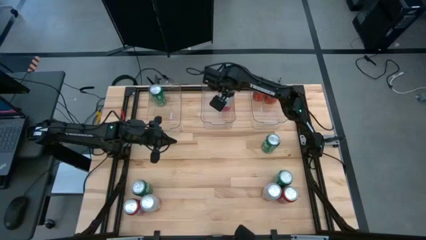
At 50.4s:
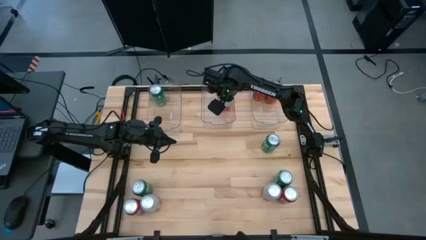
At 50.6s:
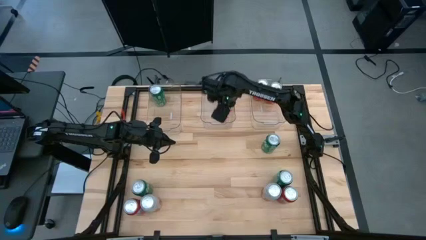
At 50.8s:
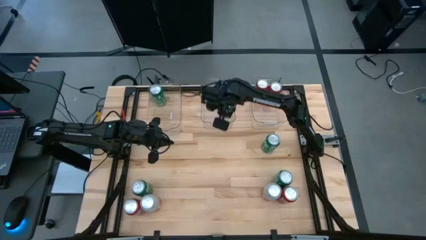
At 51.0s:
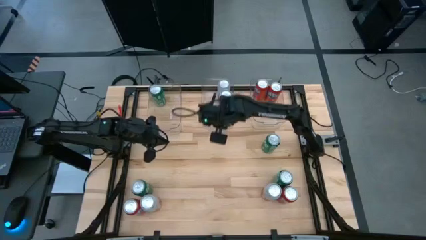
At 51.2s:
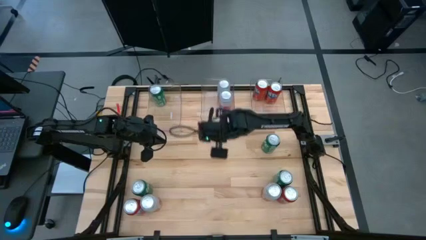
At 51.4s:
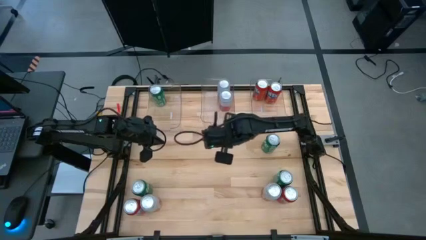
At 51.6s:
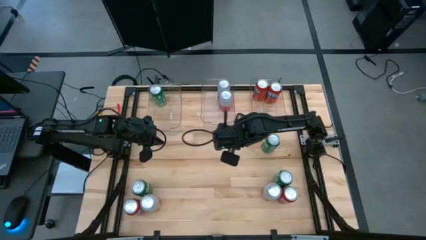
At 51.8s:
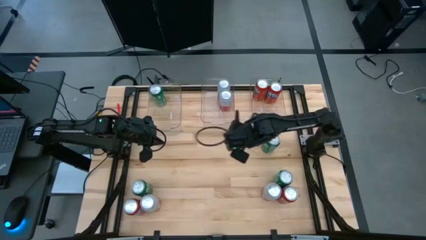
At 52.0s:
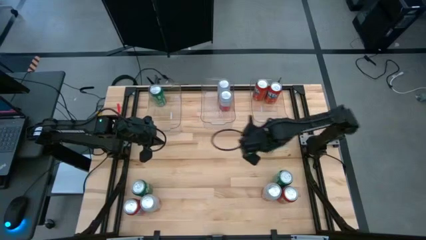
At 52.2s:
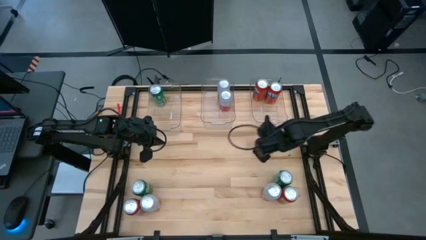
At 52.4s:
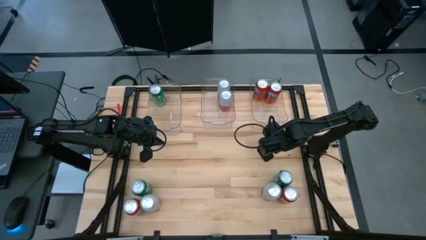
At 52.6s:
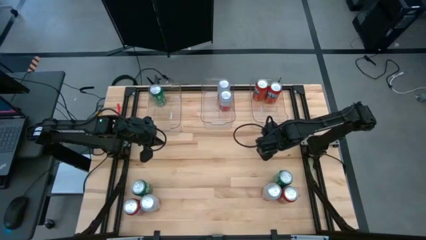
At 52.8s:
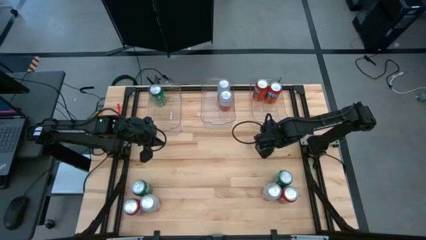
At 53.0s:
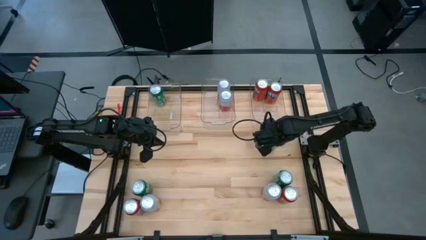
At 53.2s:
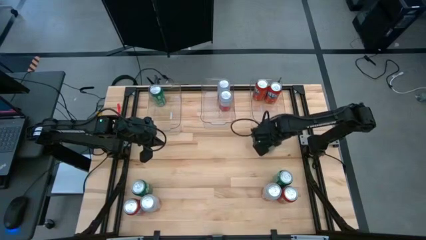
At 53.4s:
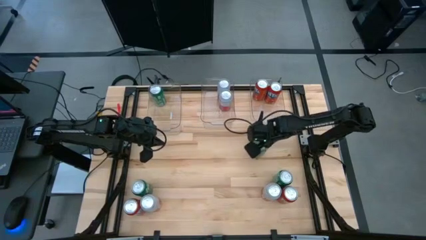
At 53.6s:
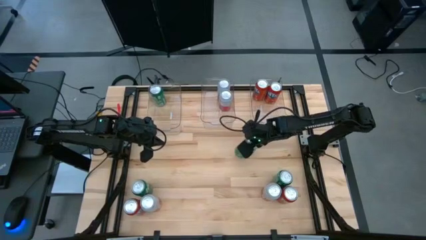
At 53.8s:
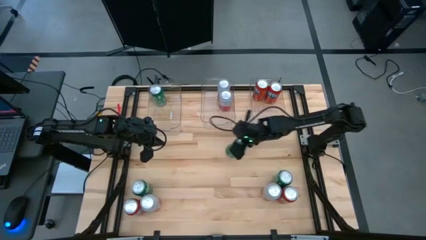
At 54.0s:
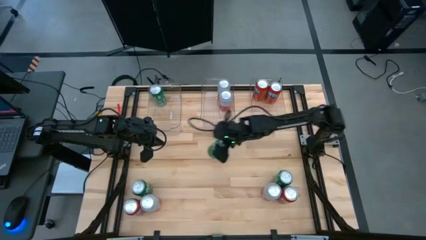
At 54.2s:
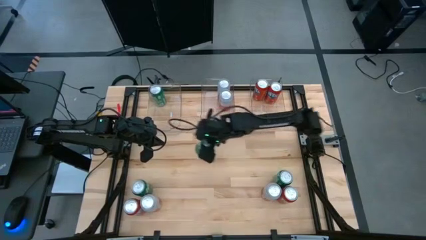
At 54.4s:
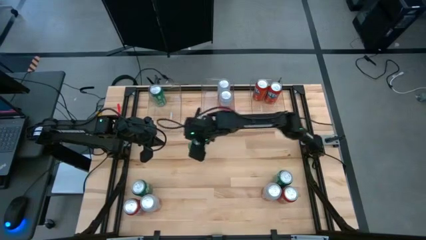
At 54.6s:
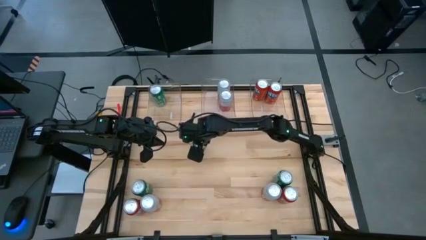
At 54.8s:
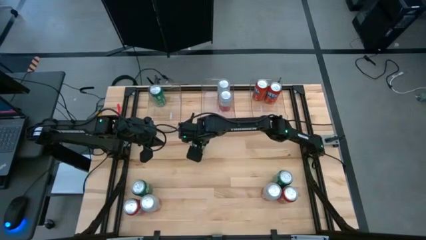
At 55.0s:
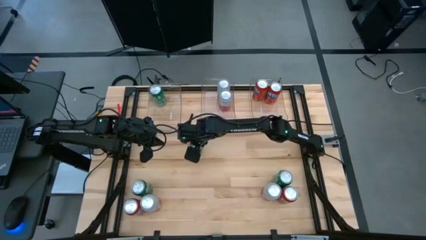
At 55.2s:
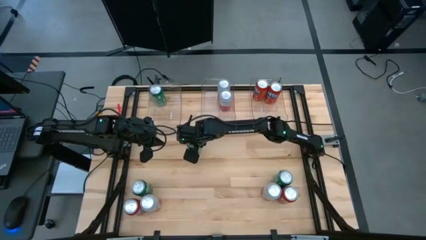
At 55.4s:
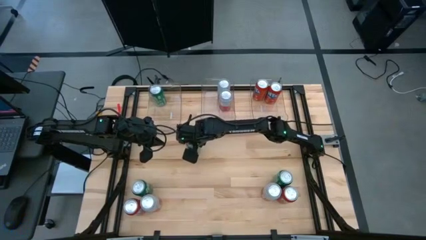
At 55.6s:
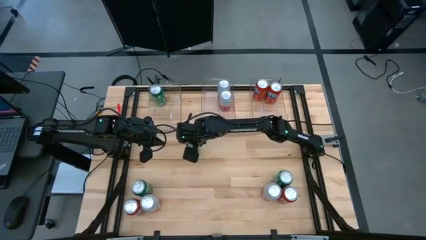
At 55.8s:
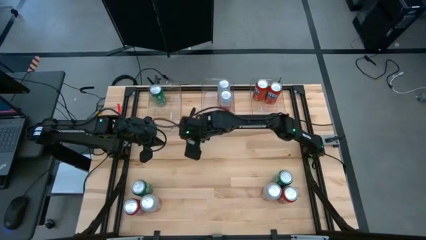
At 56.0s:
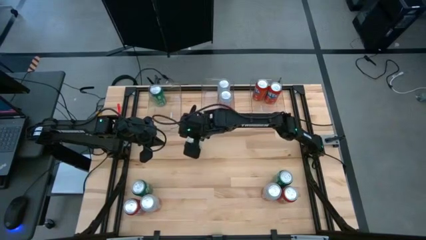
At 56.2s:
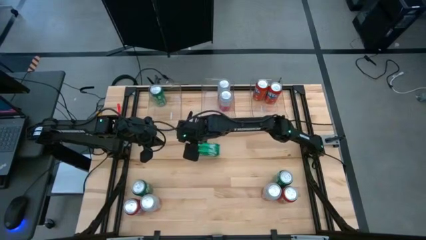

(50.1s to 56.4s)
Task: Sort soda cans
Put the green soda can into the left transparent bin

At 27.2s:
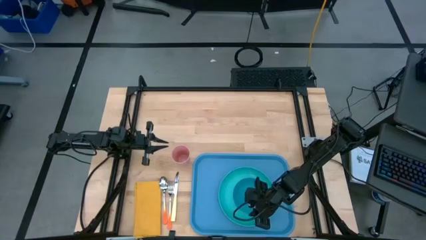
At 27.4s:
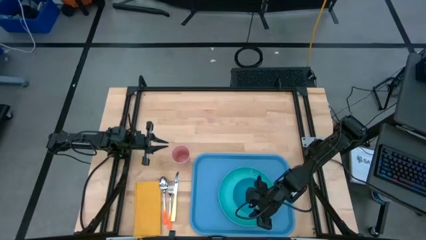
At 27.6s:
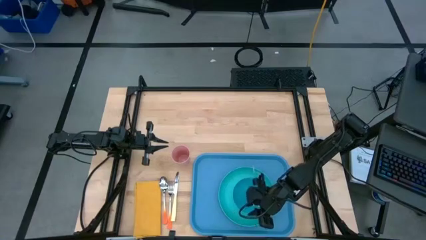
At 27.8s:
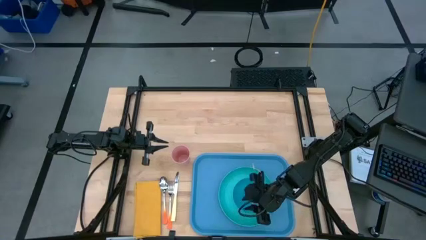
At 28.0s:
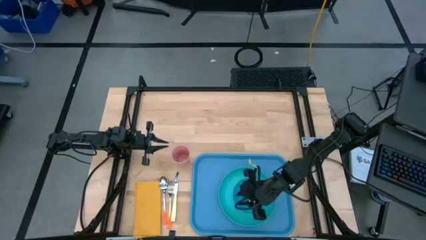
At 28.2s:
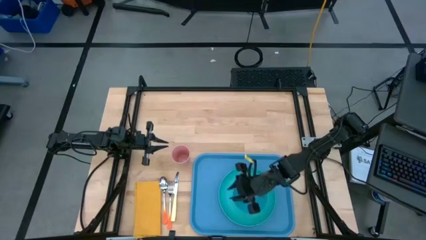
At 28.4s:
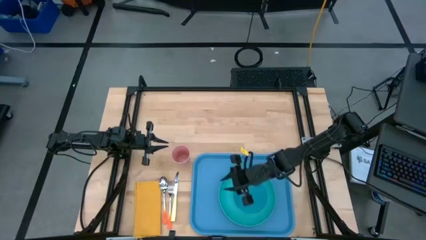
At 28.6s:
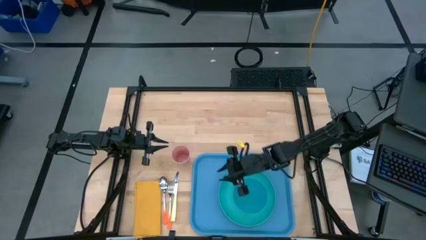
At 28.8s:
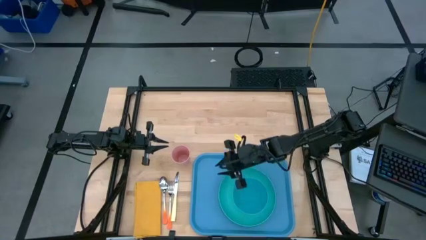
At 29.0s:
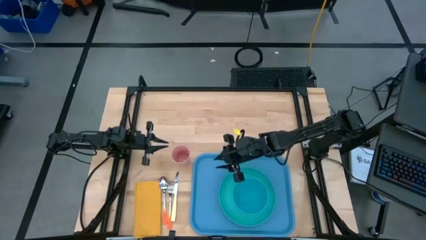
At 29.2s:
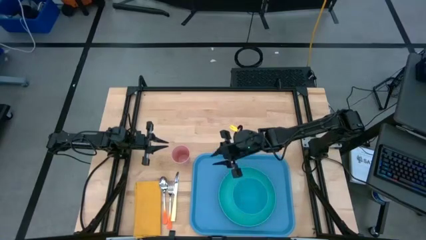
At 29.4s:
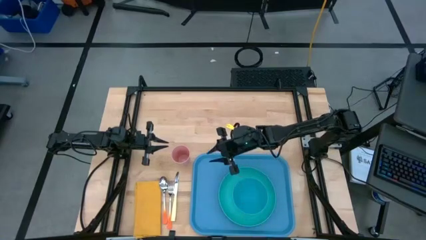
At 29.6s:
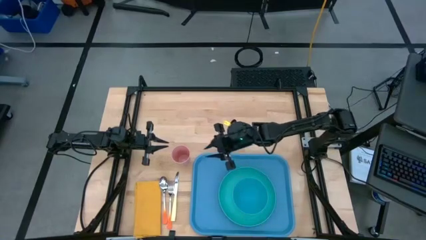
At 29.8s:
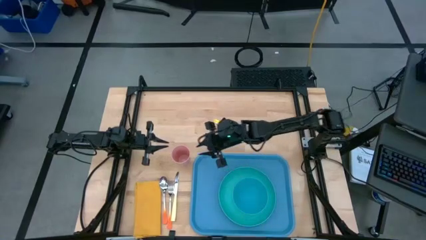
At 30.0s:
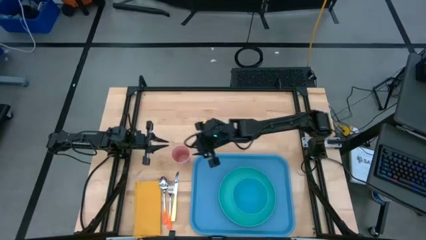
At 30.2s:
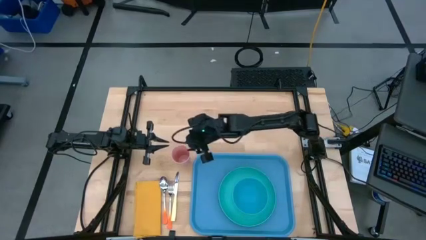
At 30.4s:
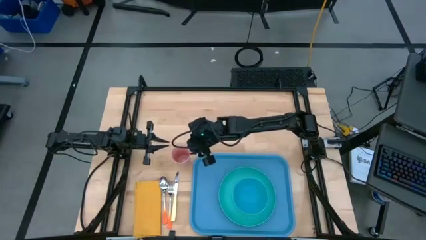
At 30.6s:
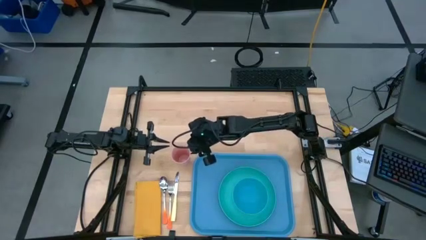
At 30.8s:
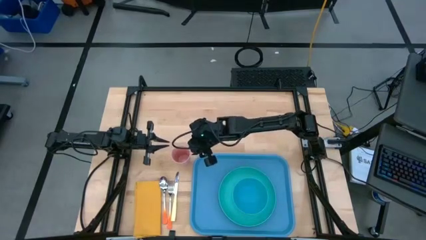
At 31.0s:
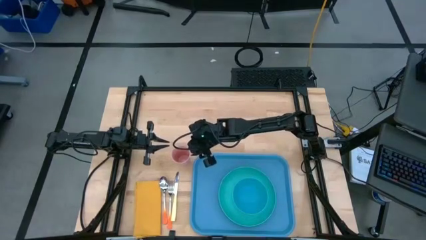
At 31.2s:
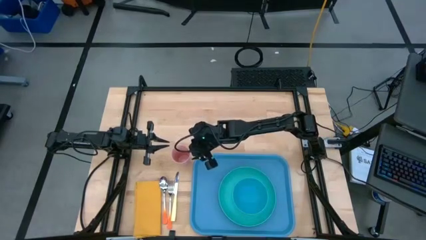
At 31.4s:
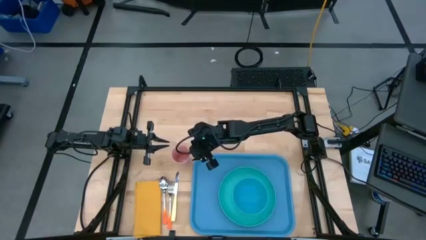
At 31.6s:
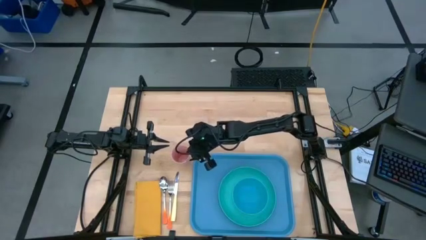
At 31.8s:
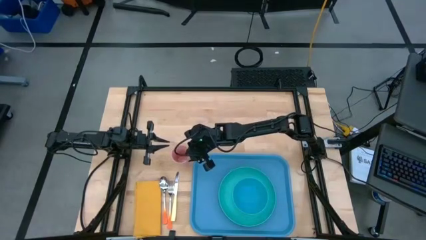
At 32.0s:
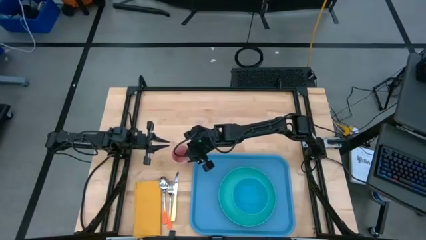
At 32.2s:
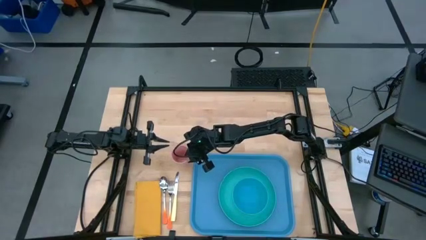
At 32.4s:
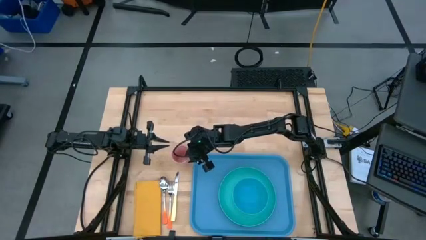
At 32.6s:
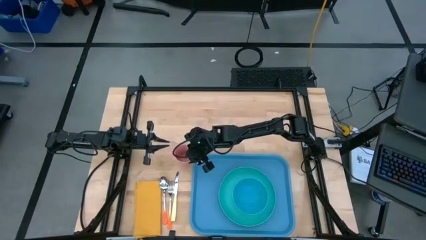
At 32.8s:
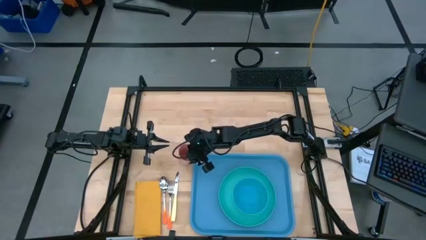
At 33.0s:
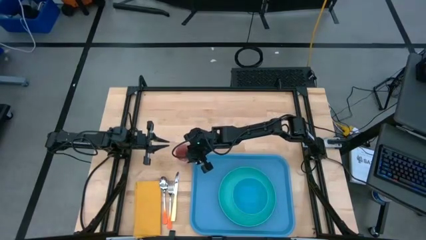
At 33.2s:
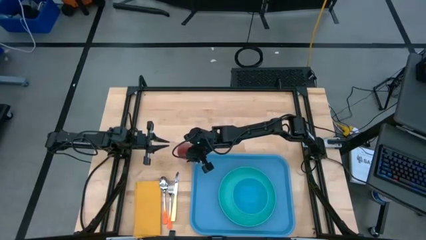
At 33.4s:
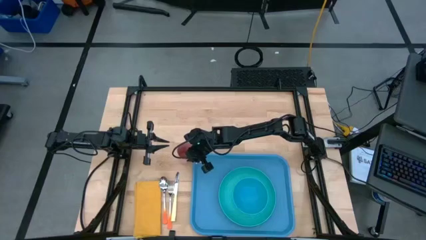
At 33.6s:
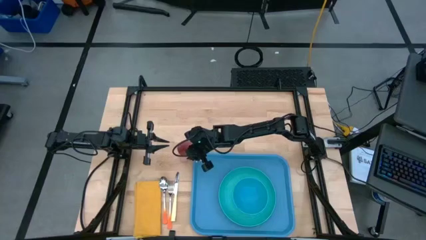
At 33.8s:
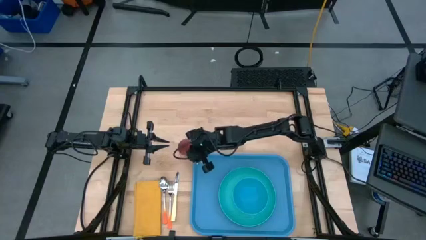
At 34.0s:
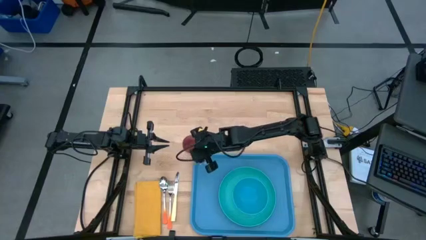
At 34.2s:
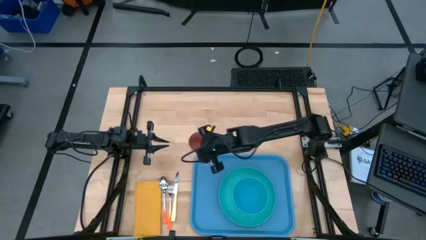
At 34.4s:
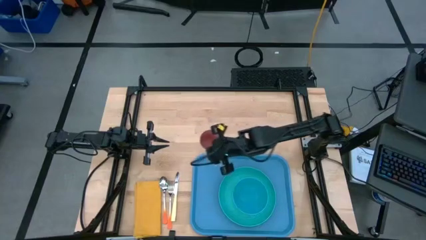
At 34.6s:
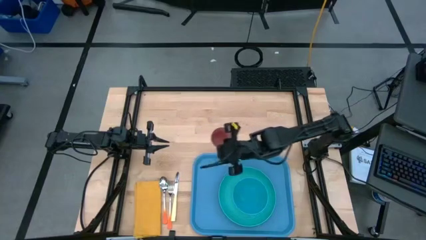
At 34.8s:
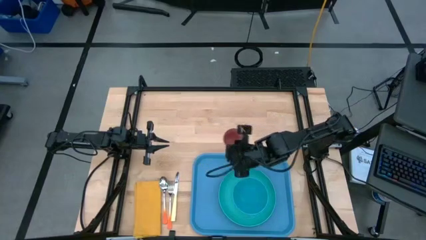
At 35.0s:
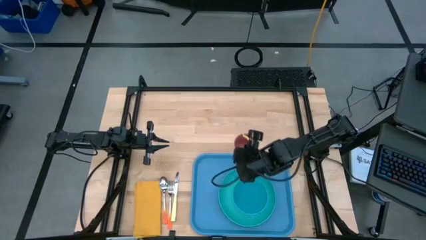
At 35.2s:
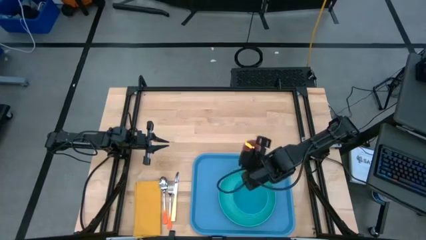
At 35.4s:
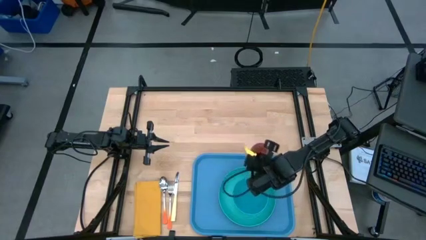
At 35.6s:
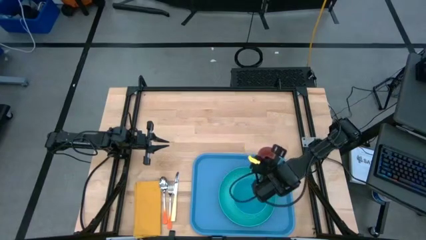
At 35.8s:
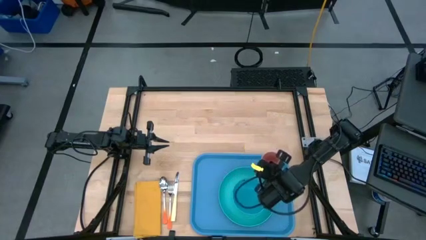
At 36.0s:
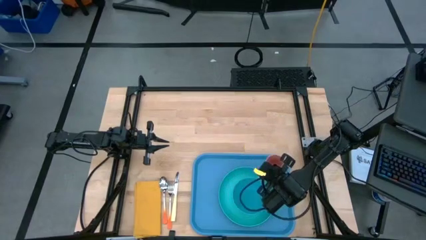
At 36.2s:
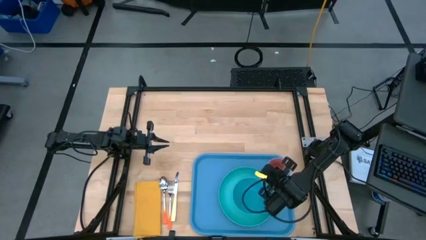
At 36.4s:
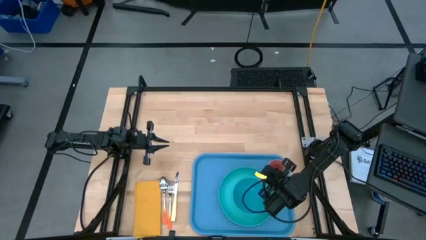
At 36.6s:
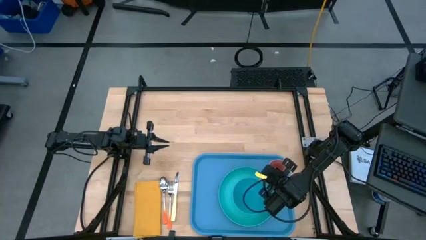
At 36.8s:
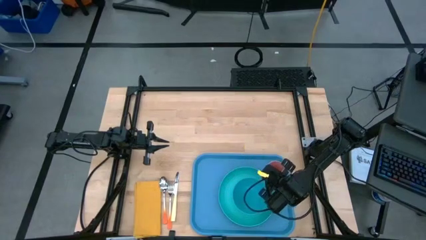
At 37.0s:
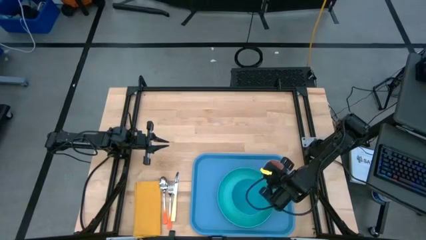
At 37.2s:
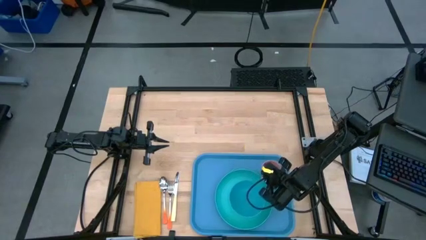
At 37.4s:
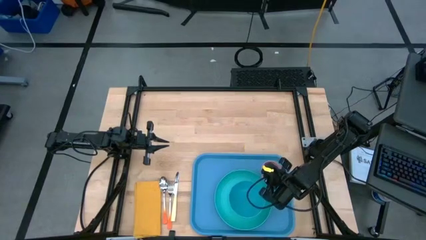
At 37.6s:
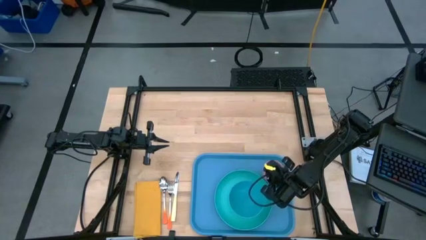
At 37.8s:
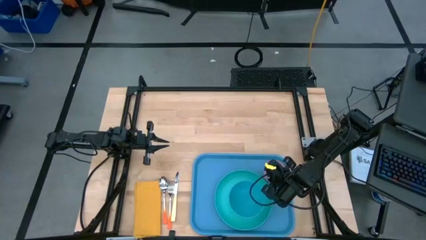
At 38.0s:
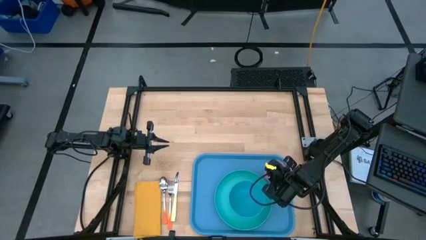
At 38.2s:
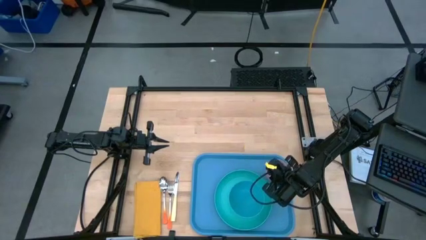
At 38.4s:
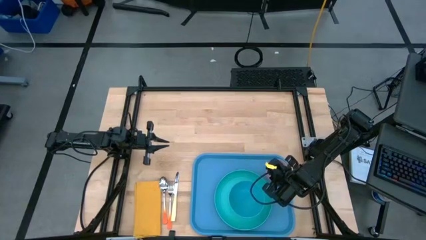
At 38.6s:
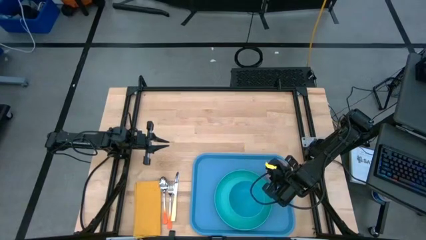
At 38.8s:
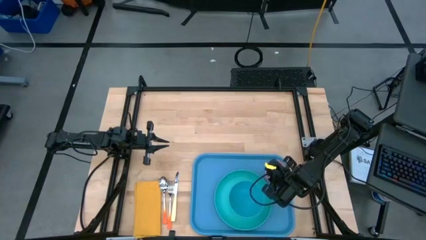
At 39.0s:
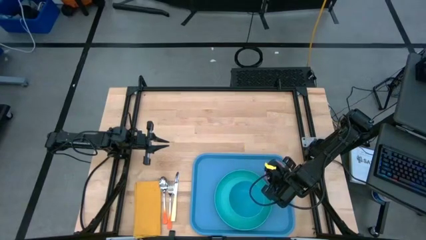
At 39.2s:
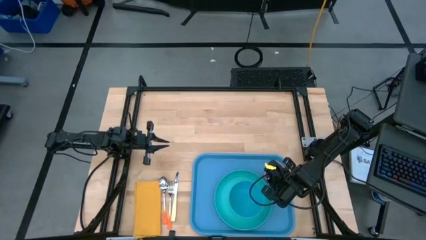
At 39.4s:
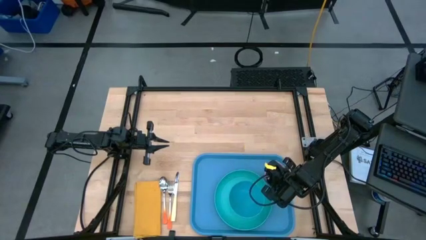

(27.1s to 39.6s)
Task: Set up tray
Put the pink cup on the blue serving tray at the top right of the light blue plate
